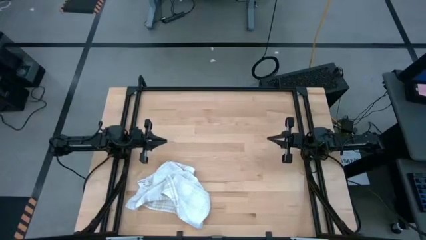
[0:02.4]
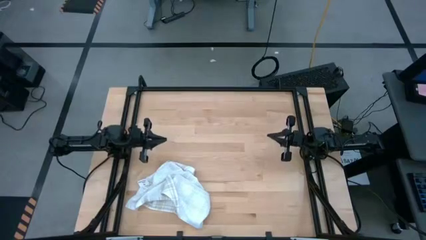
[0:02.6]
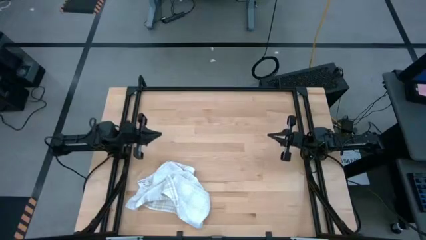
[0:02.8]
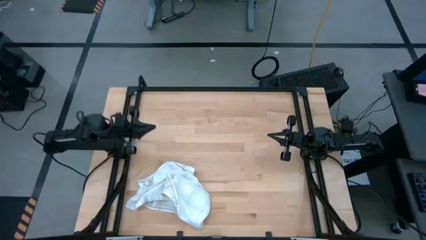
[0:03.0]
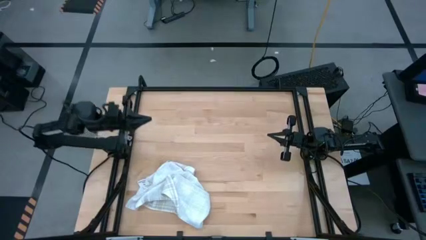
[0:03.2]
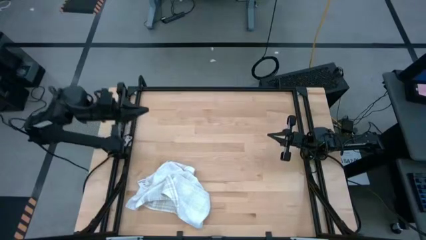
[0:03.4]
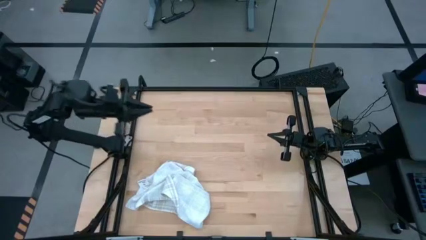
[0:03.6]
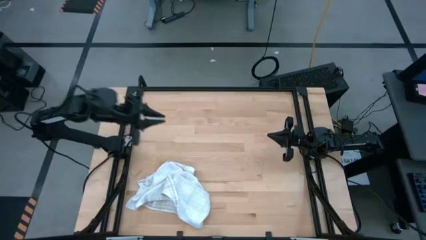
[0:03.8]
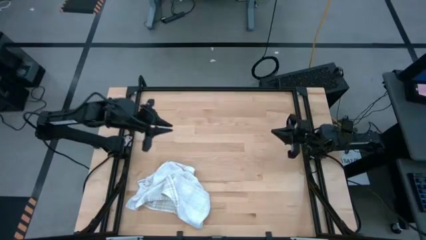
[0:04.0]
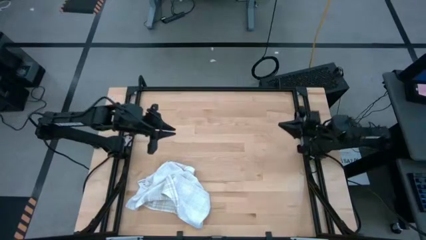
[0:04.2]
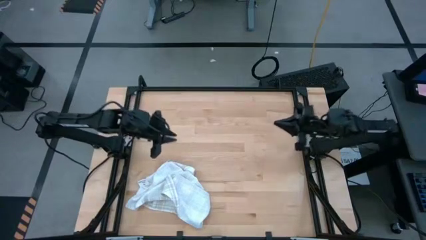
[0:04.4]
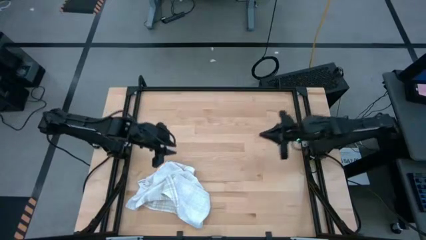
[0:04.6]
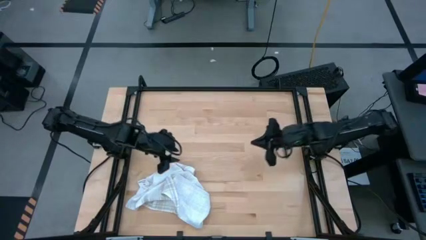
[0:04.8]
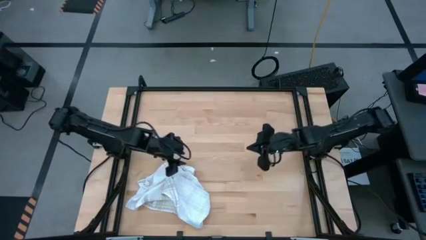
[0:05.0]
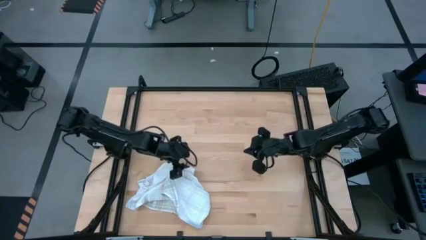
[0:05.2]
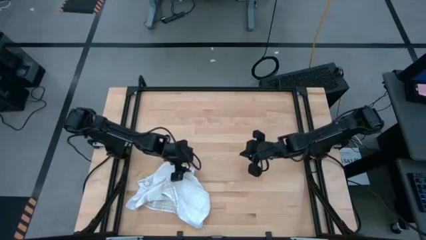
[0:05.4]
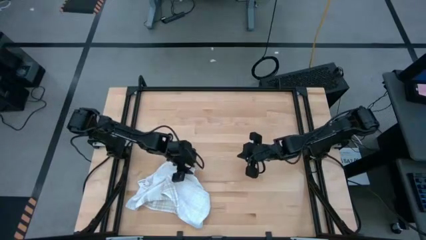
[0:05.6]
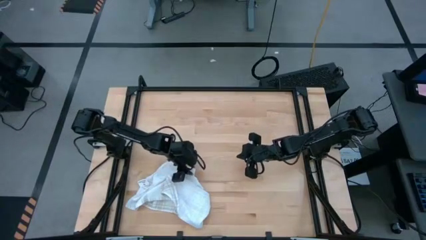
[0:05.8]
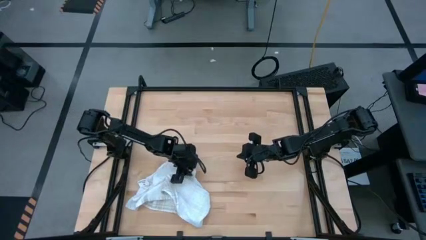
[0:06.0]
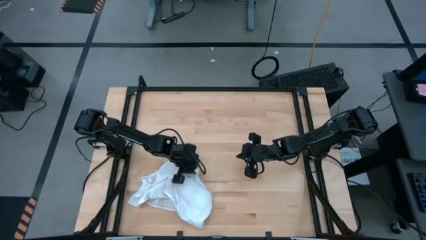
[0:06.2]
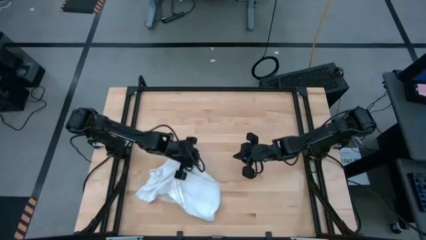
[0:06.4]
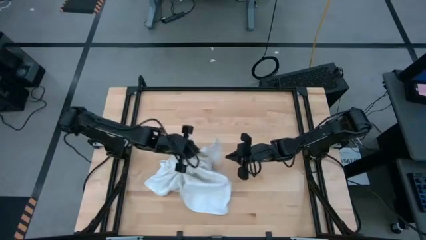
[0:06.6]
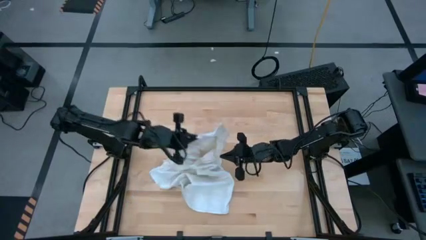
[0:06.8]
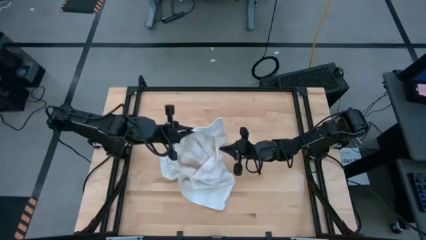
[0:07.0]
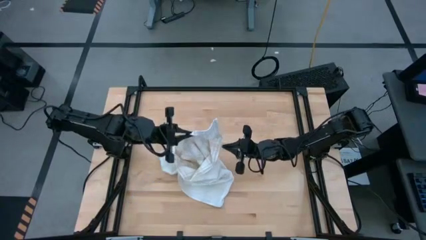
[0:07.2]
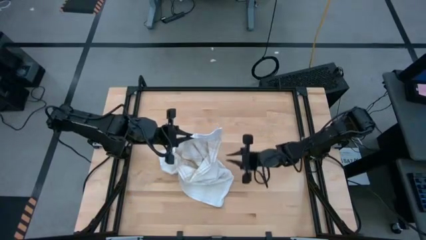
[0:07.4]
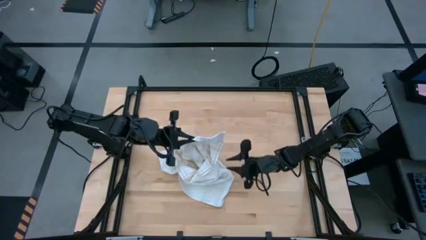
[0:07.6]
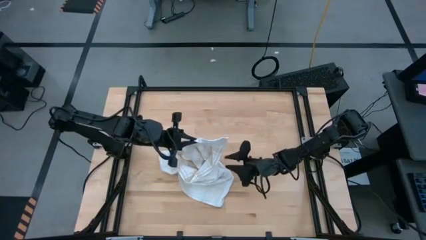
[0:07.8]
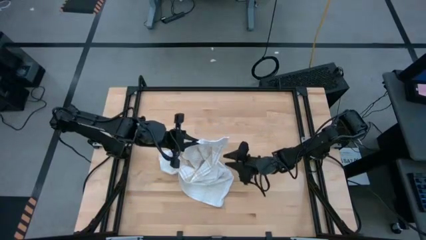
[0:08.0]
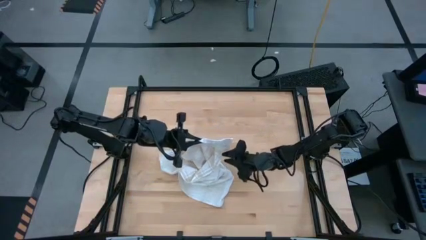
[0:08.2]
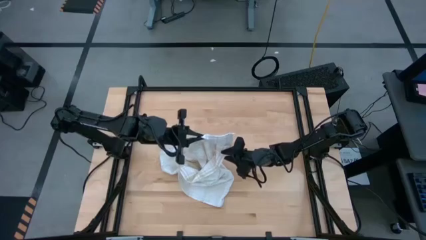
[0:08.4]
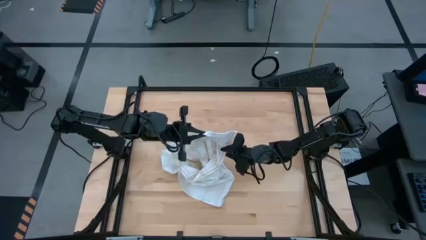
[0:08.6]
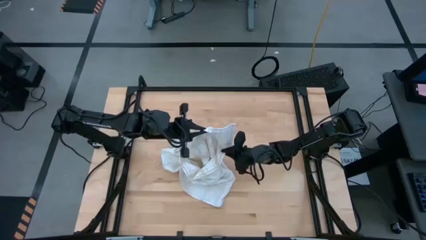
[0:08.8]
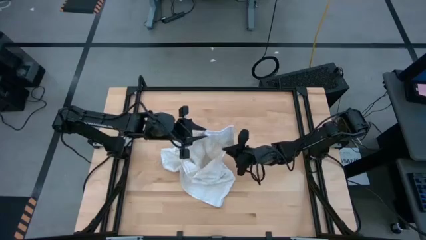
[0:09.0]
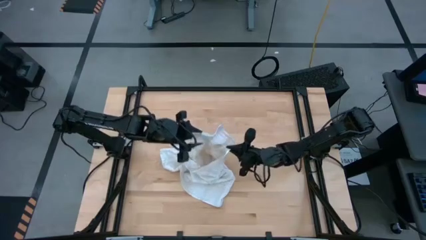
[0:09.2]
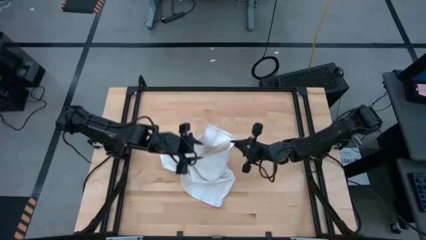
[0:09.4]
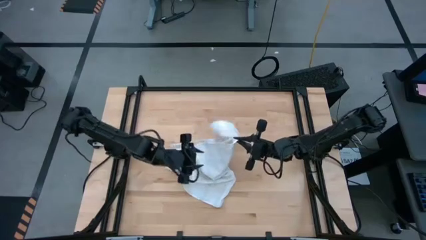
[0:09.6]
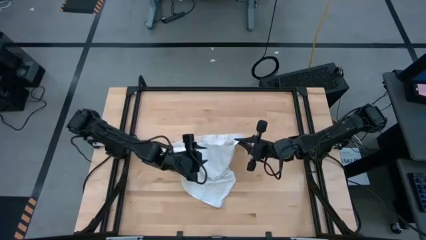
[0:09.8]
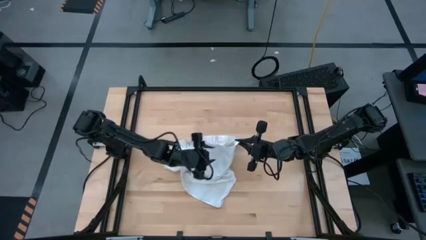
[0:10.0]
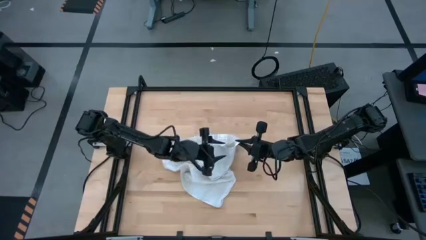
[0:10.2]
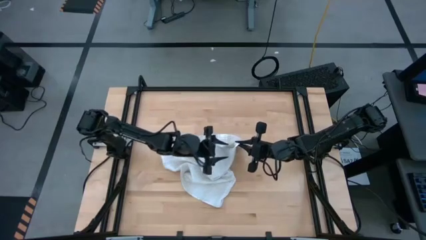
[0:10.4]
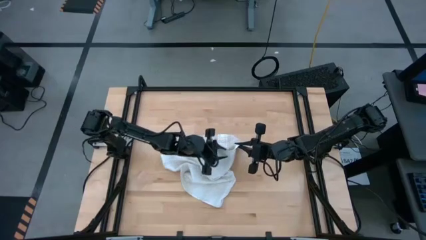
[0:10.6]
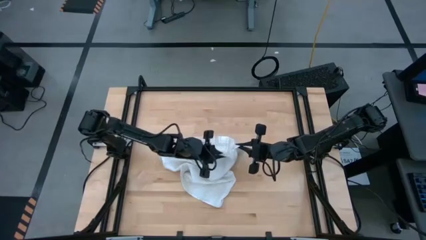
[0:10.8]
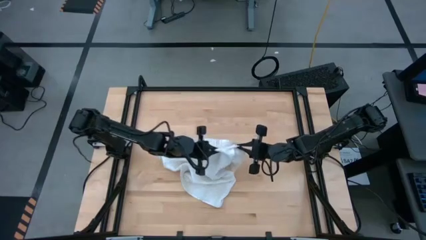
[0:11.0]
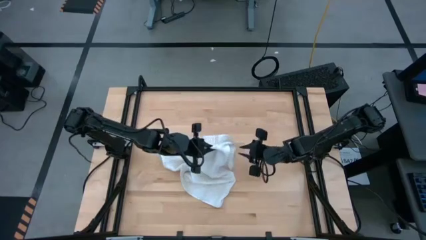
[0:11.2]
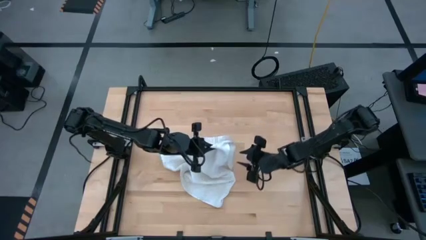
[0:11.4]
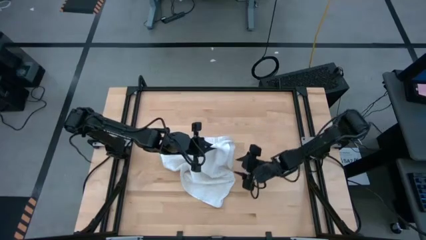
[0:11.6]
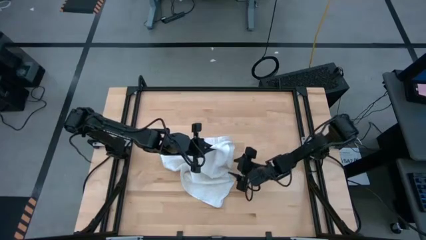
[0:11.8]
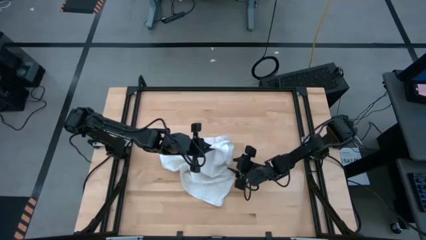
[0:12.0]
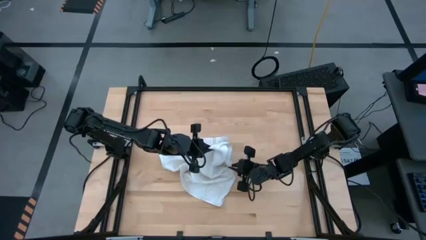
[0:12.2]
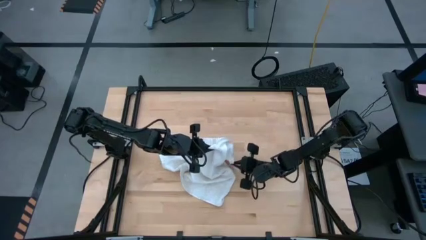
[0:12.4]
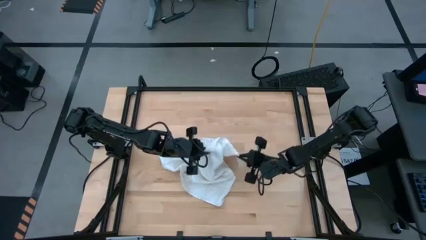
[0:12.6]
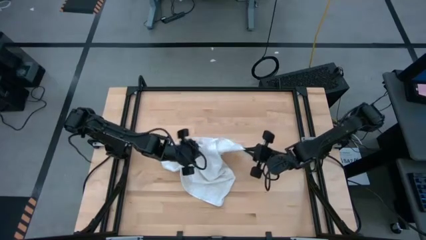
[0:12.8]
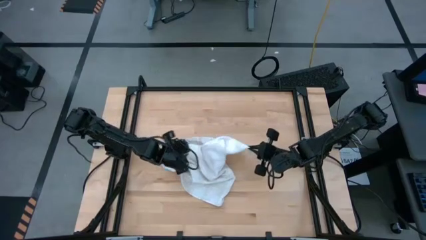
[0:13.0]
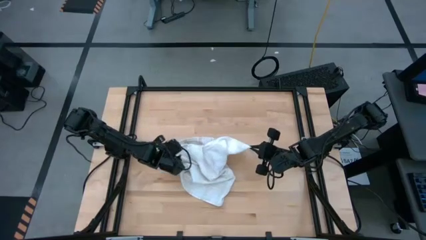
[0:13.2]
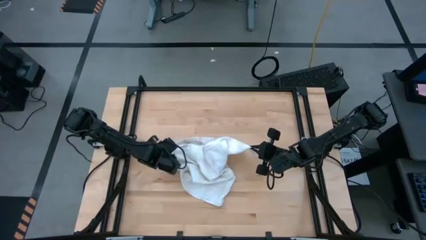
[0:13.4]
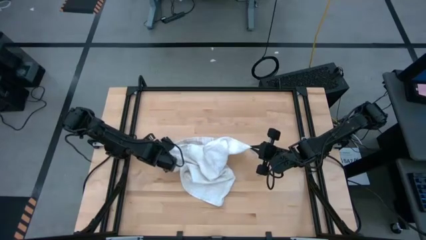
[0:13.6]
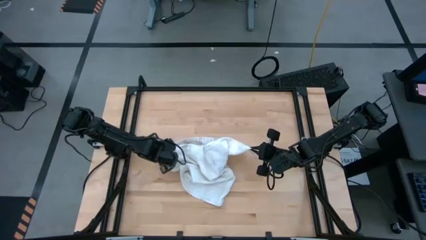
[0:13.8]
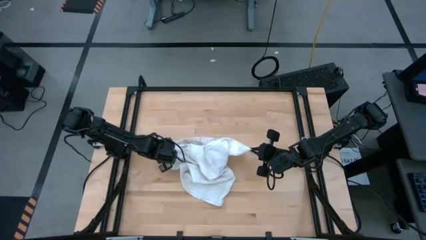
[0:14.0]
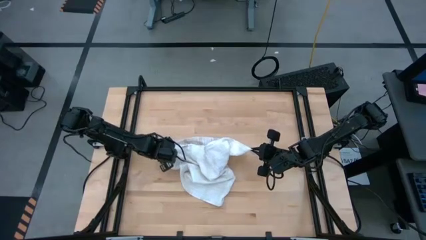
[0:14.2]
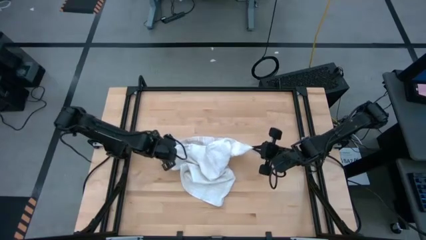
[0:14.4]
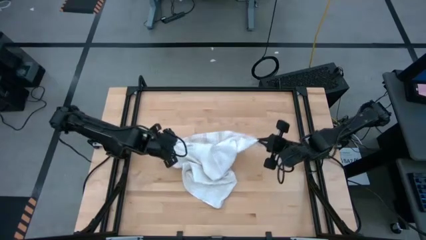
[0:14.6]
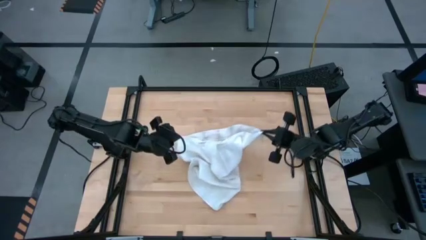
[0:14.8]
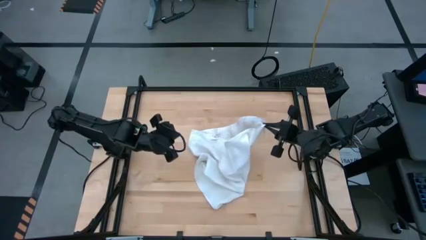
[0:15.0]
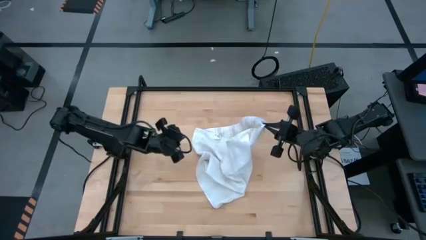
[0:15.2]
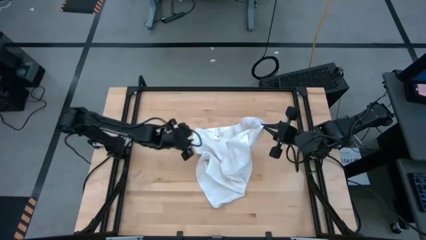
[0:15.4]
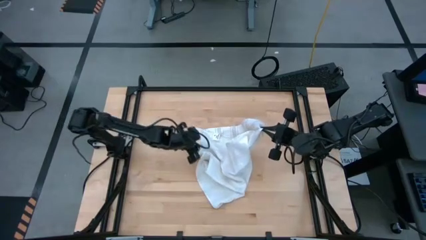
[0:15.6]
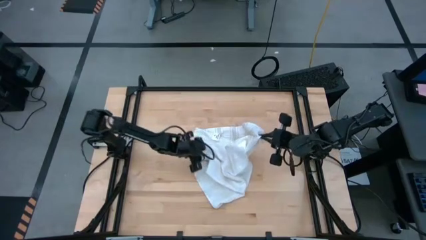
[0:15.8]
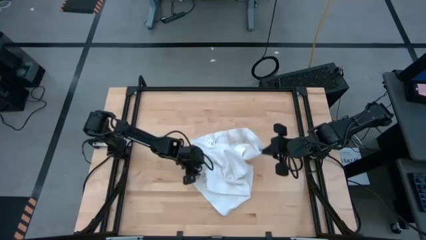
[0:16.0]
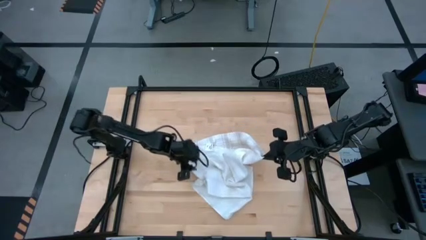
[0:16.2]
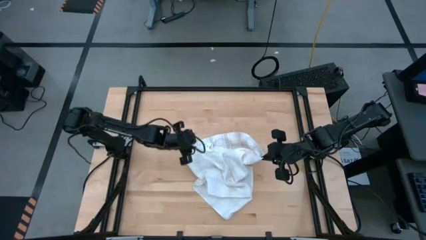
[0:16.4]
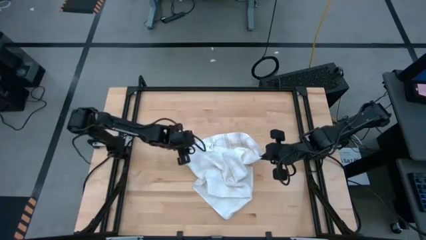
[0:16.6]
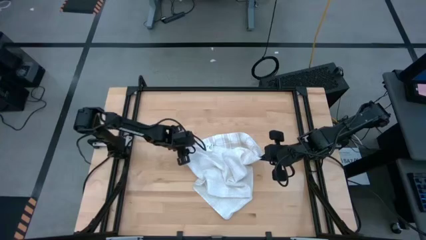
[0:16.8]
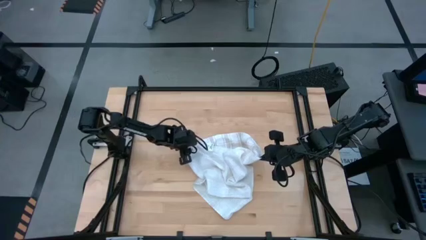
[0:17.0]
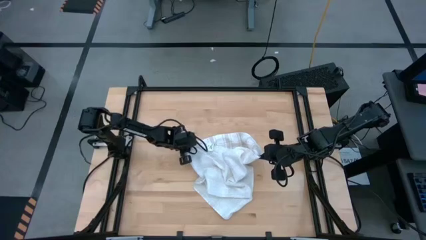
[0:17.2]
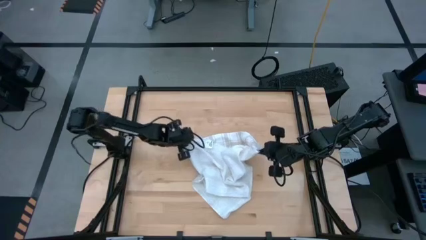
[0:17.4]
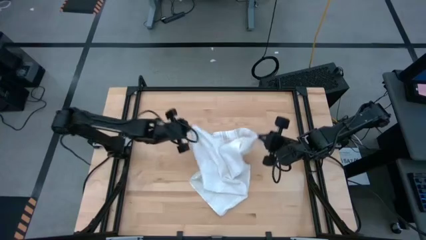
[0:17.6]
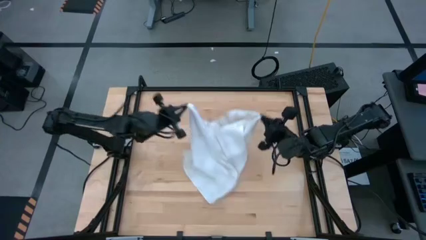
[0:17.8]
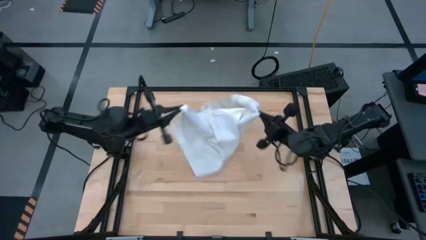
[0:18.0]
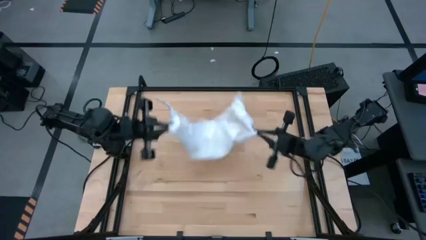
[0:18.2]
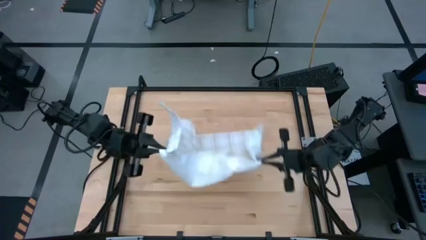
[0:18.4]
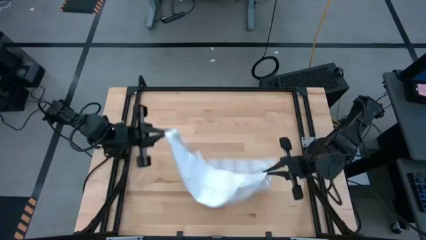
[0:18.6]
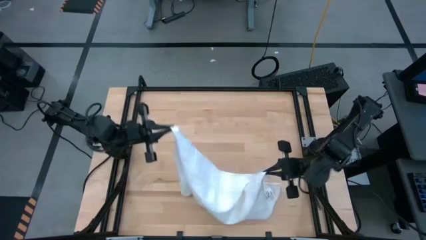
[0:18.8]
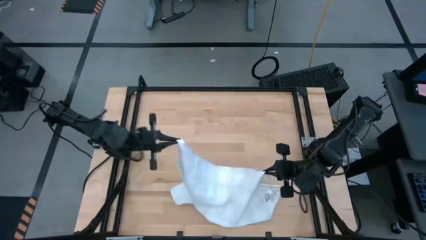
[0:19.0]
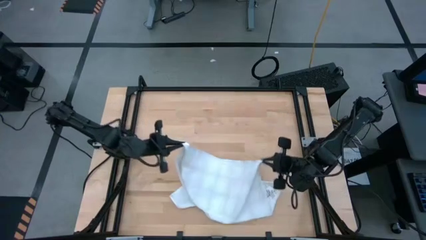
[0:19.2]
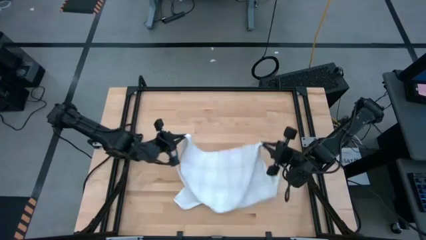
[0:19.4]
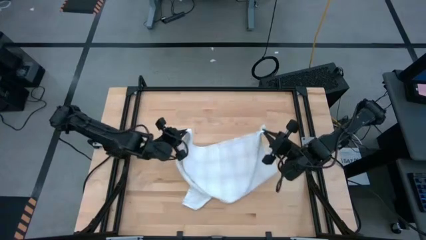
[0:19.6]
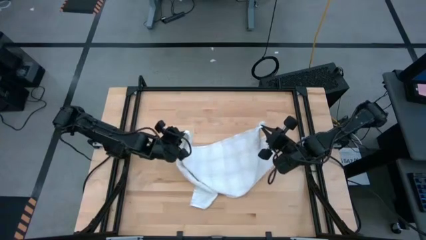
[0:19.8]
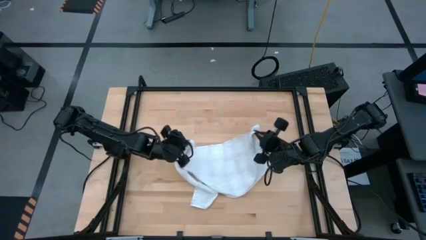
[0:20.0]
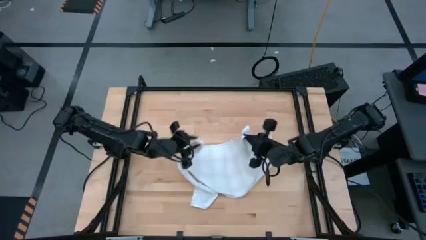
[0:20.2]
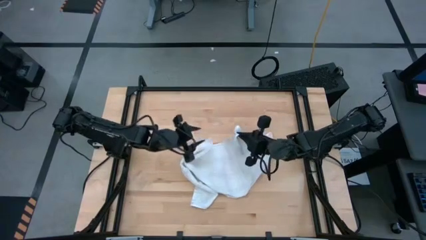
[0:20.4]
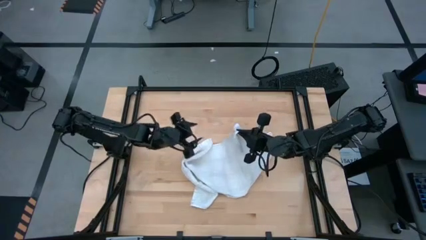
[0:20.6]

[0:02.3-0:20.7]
Task: Roll towel
Roll the white towel
